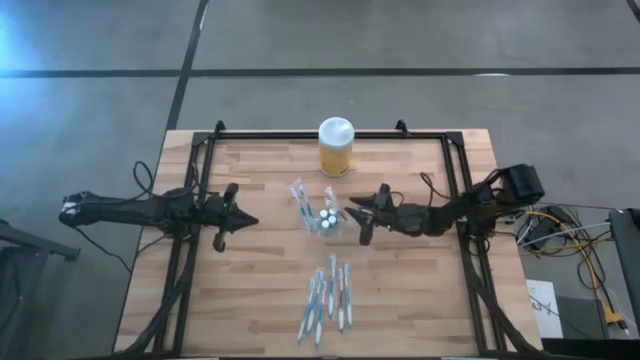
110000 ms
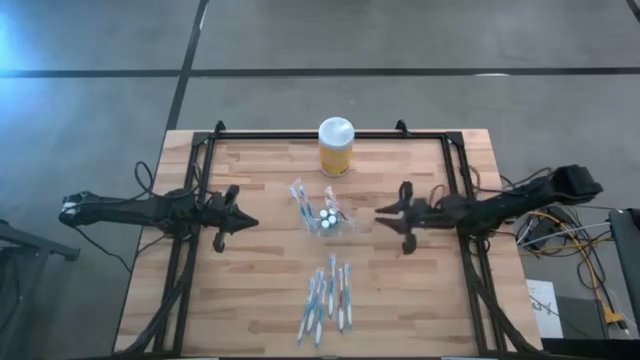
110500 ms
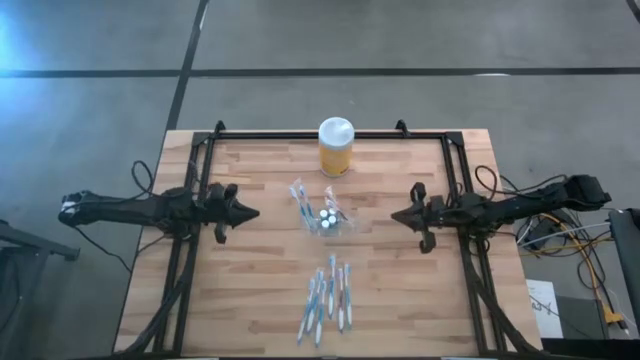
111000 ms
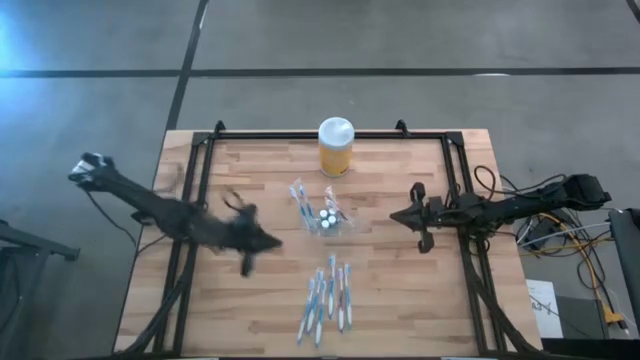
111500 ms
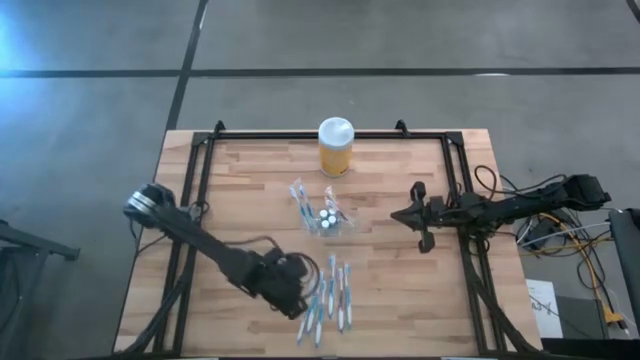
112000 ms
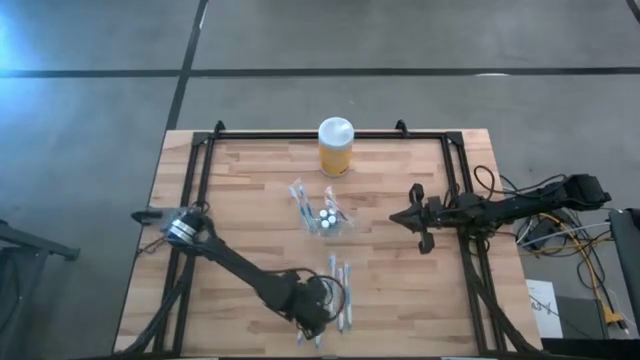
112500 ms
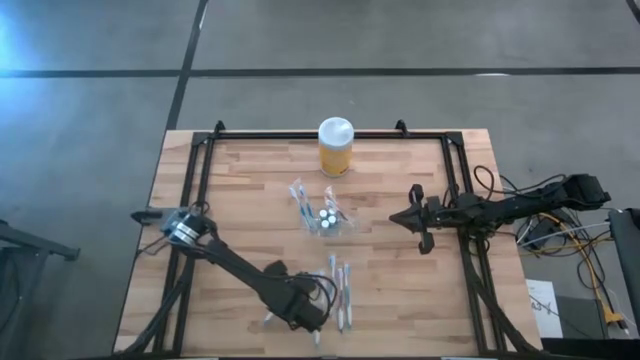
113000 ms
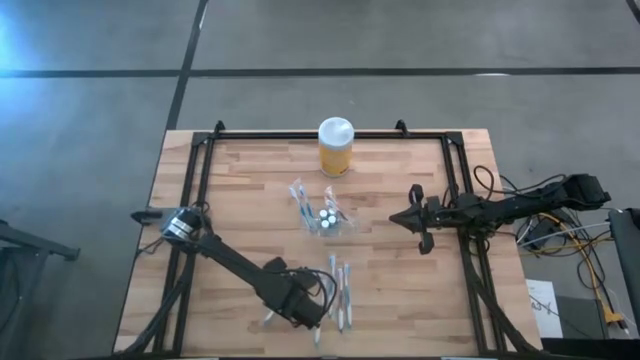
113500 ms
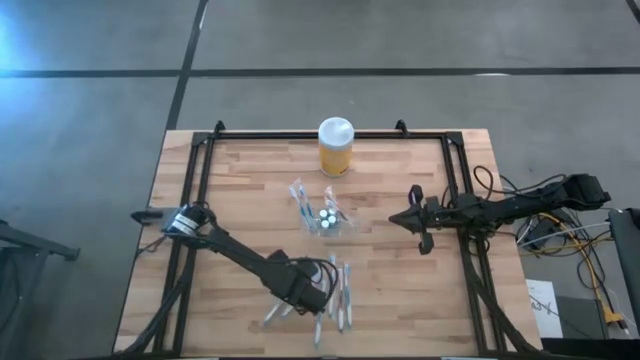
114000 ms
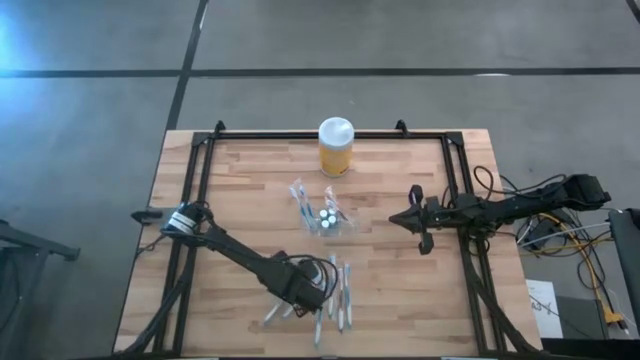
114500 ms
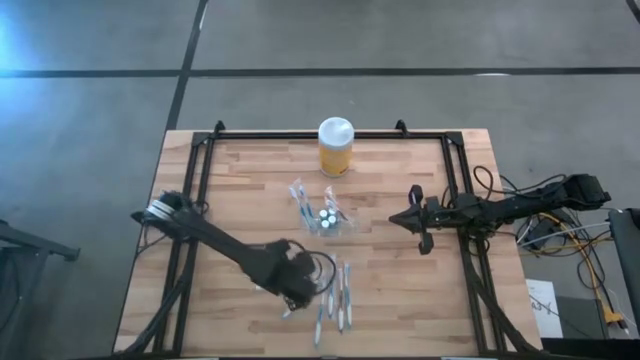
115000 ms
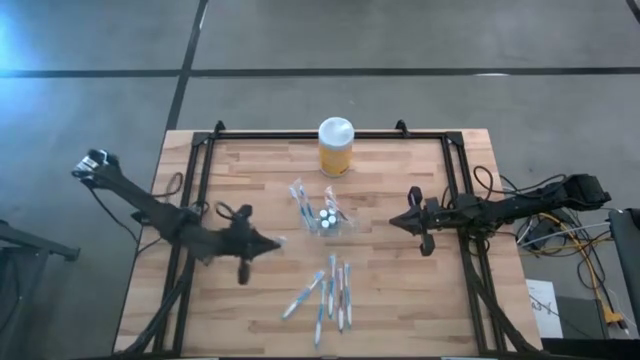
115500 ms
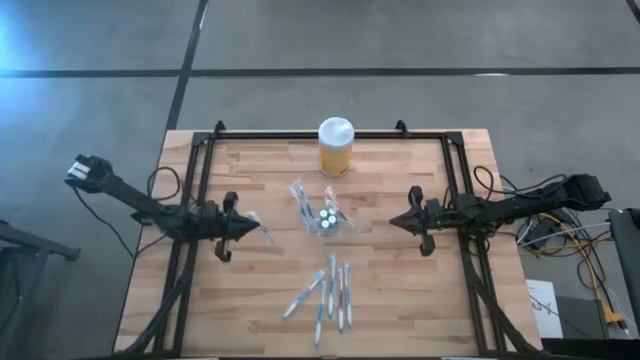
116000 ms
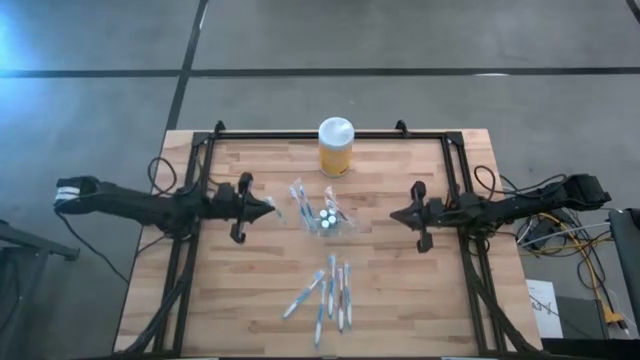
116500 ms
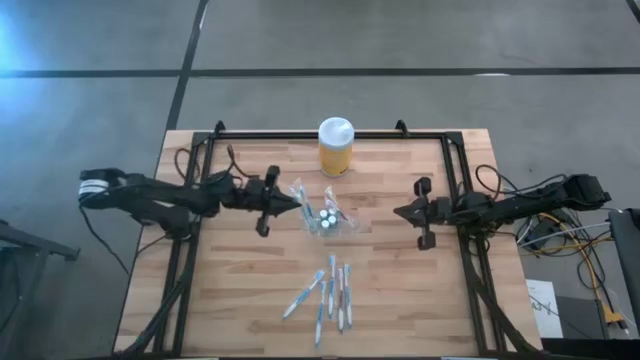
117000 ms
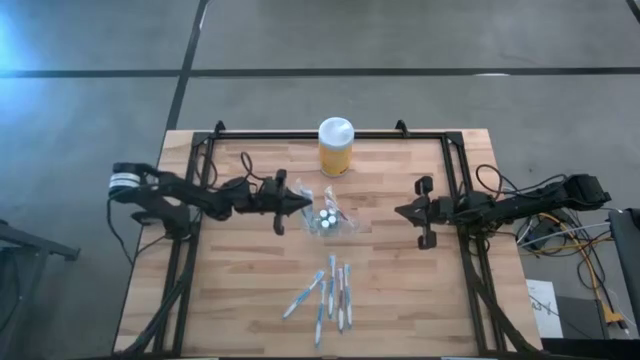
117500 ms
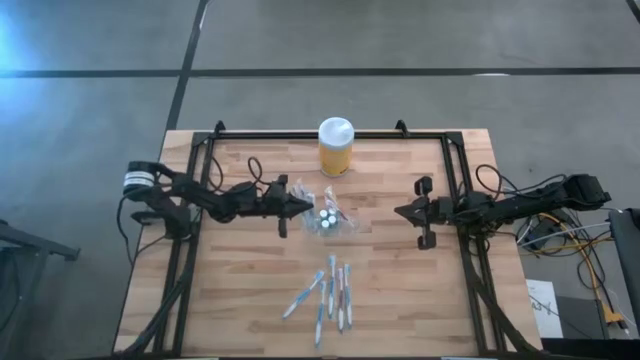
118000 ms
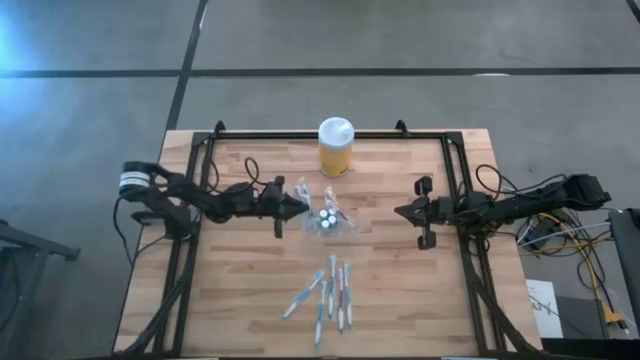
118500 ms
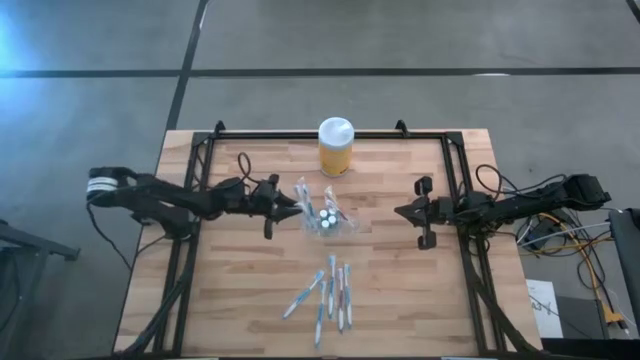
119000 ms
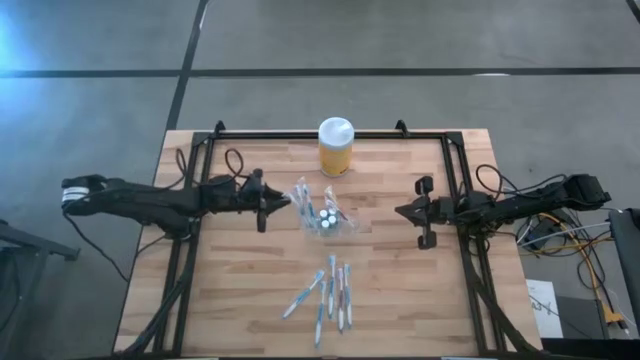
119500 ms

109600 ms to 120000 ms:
Task: Pick & Place toothbrushing station
Put the blue toothbrush into the transparent organizer

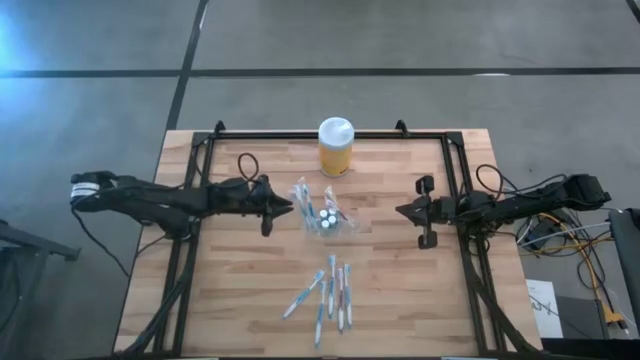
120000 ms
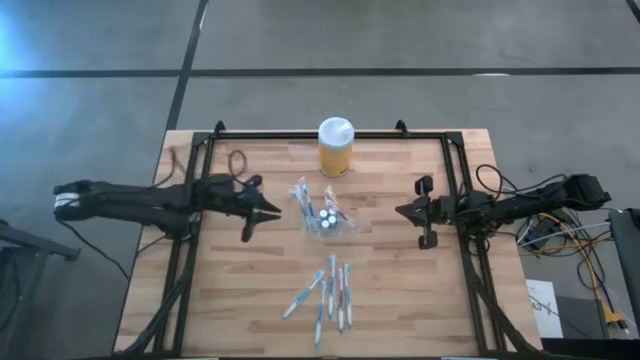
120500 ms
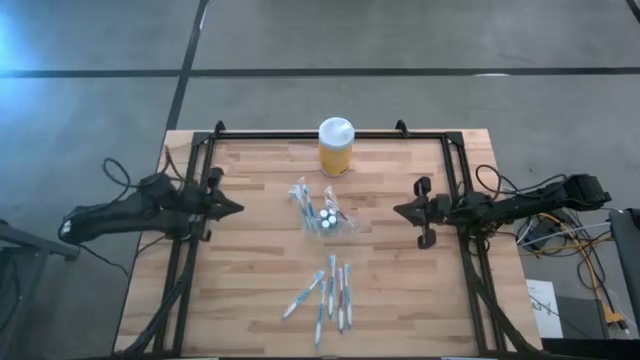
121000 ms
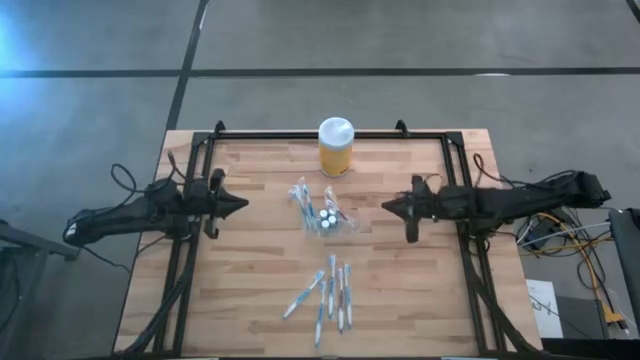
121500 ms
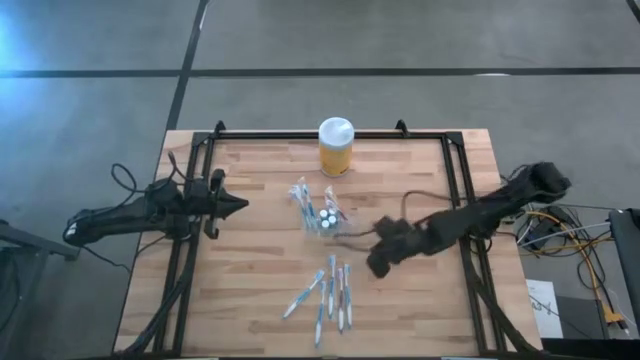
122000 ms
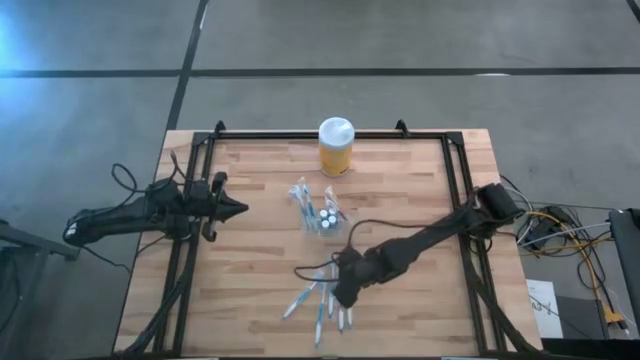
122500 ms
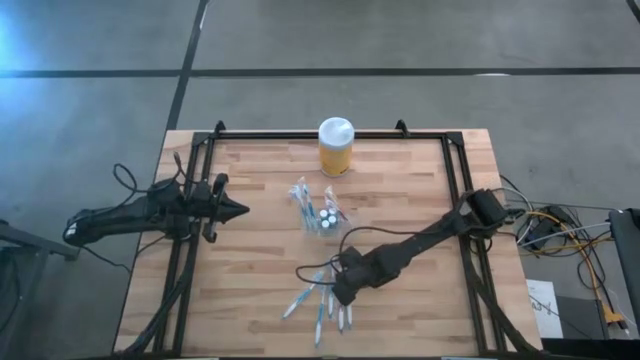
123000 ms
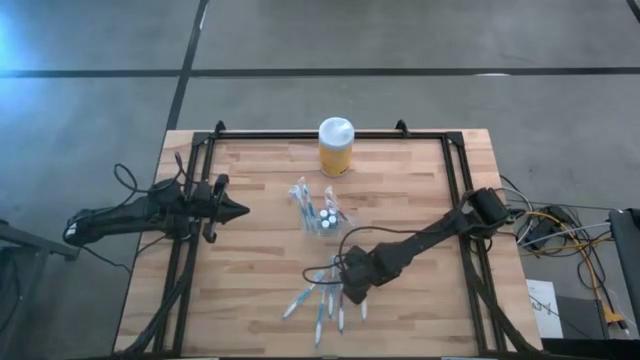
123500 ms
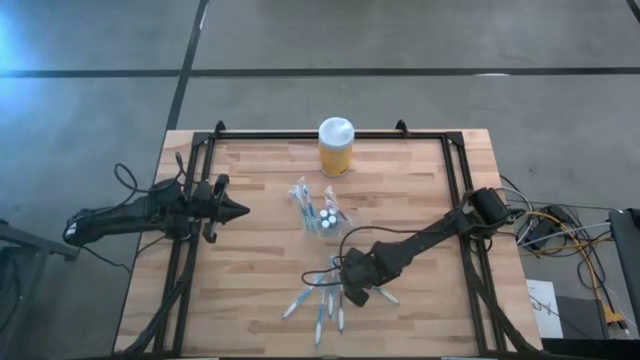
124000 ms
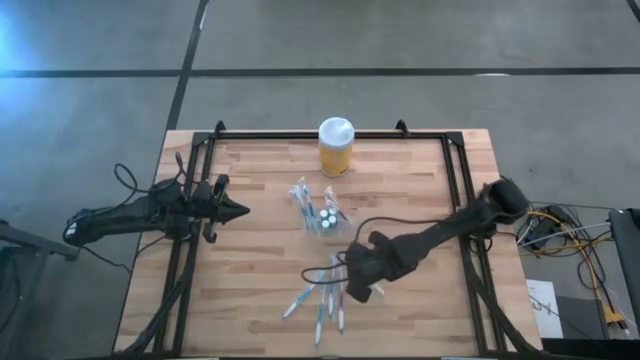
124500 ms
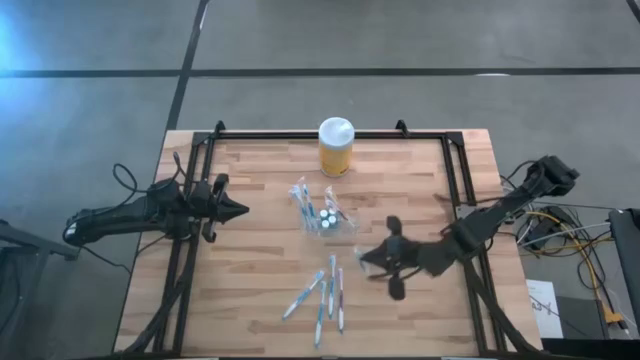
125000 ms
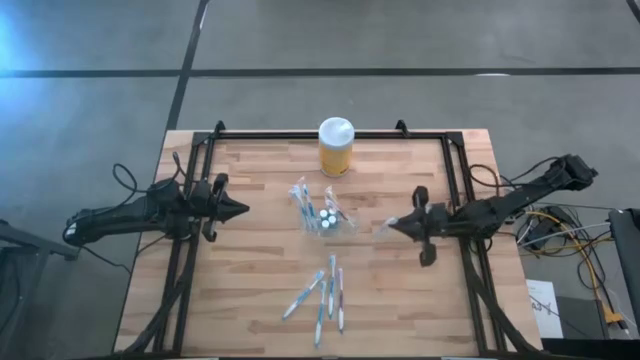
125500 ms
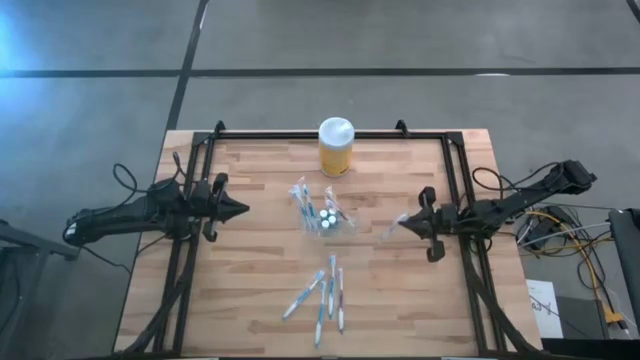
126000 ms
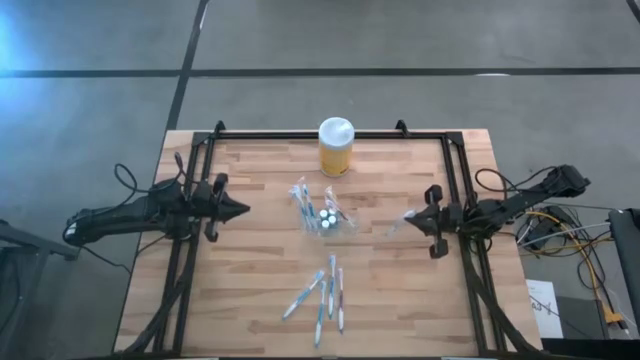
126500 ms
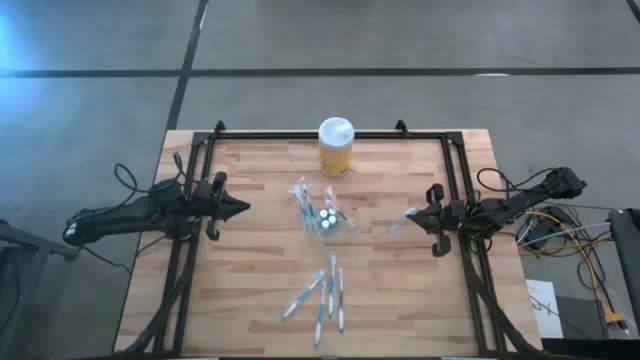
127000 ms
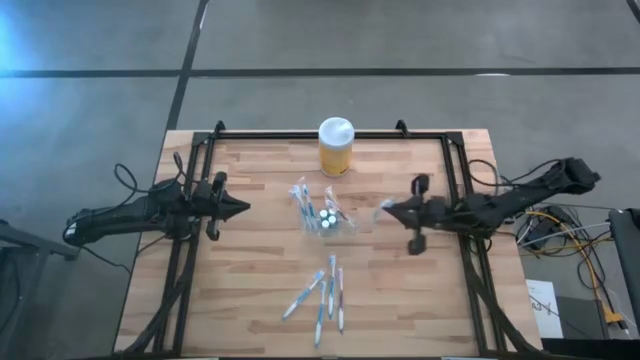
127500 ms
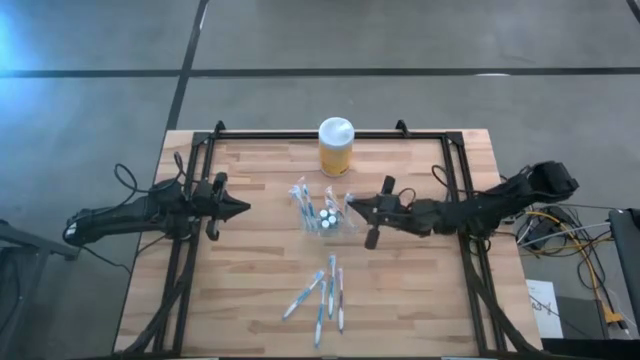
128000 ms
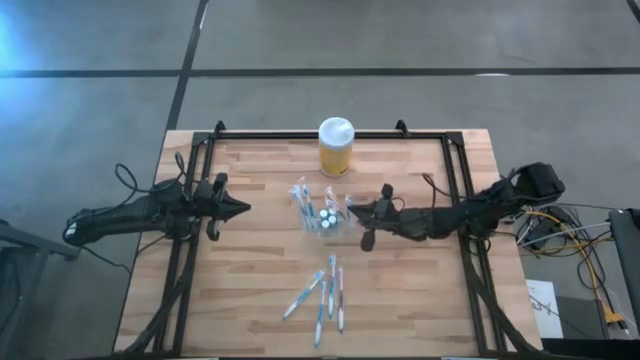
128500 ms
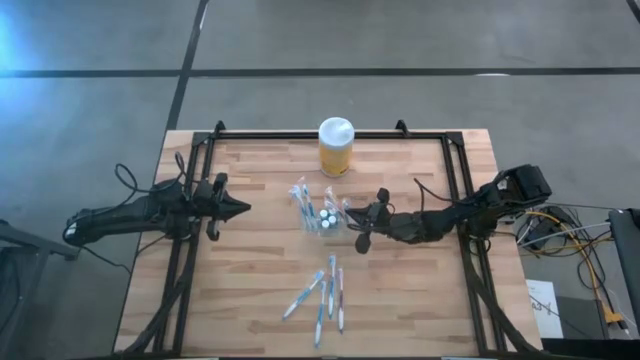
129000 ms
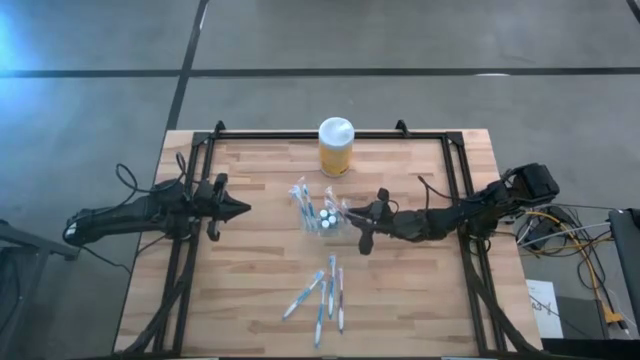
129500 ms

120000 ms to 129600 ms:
Put the blue toothbrush into the transparent organizer

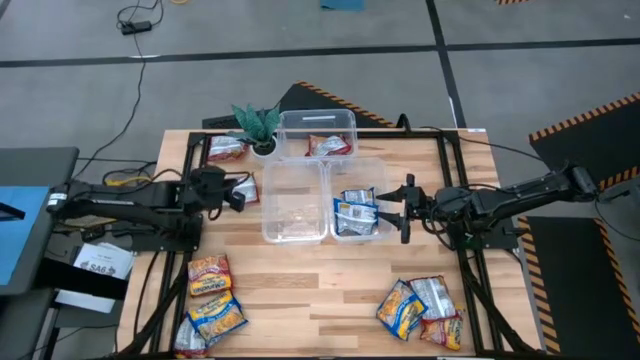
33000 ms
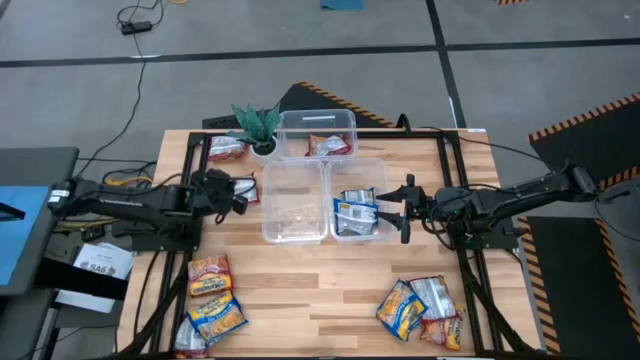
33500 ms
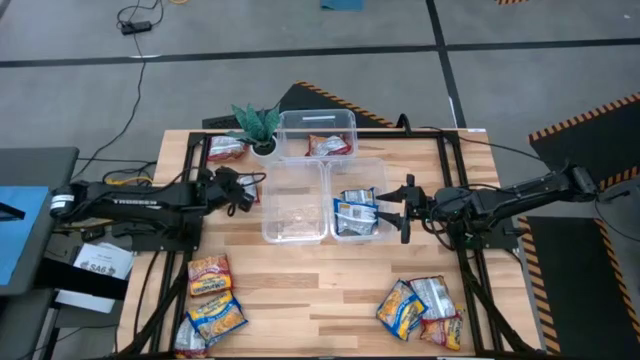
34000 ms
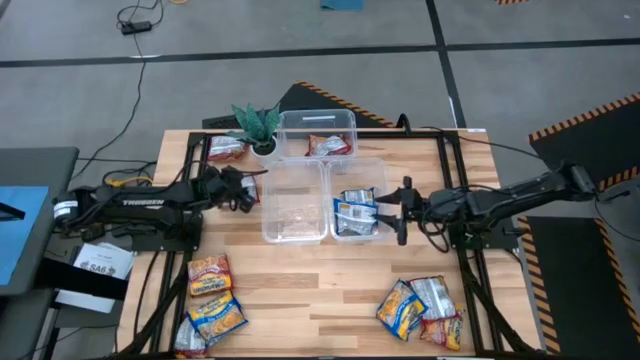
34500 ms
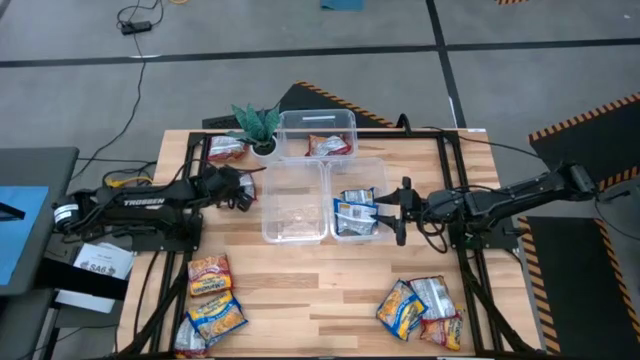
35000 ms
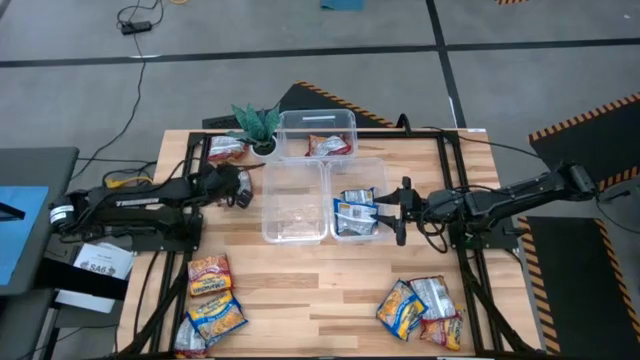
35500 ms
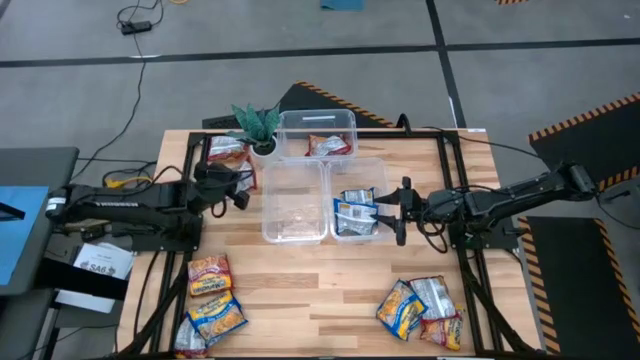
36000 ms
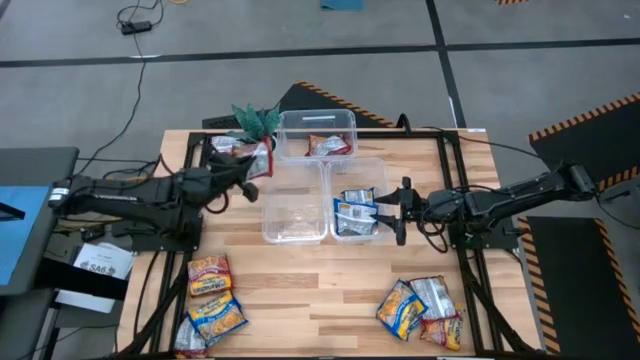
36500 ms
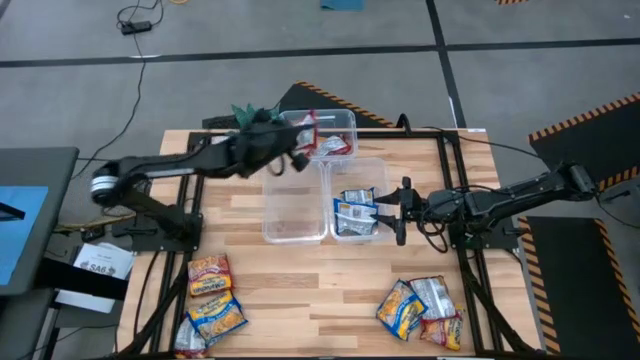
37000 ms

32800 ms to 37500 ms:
Task: Sort Maruchan noodles
Put the red noodle pack into the top transparent bin
